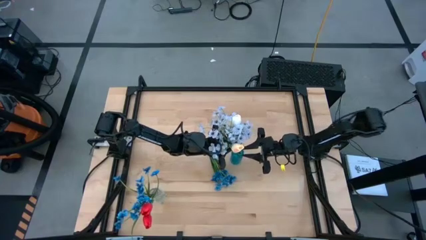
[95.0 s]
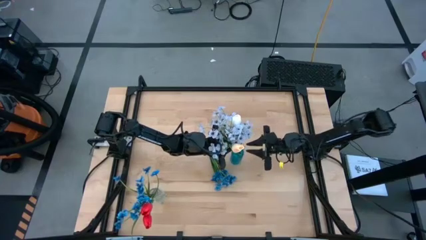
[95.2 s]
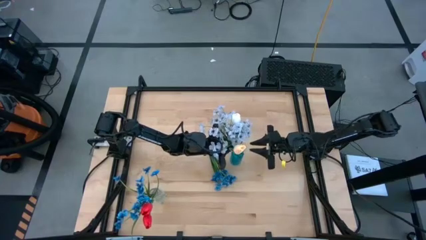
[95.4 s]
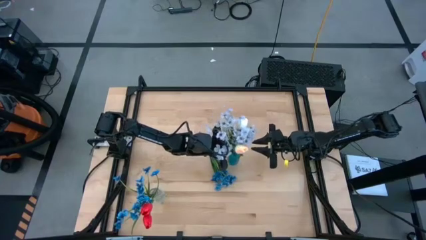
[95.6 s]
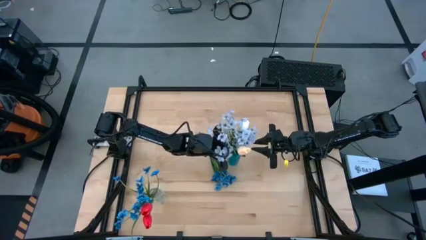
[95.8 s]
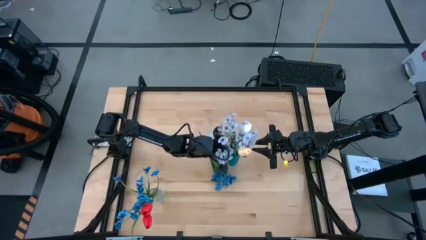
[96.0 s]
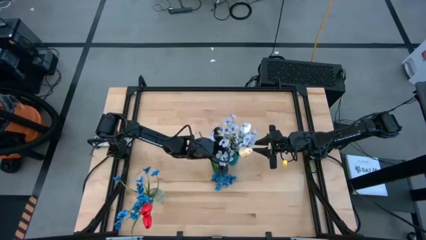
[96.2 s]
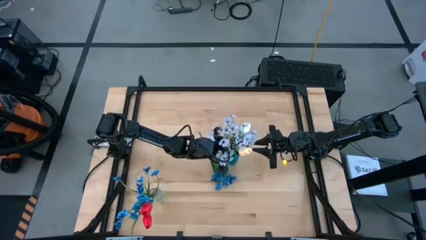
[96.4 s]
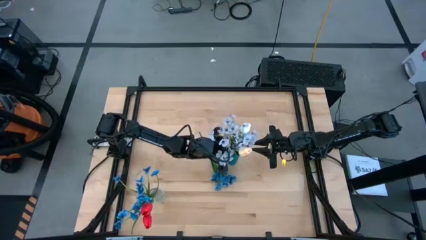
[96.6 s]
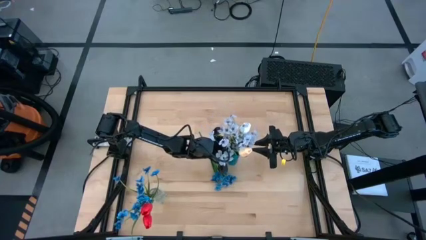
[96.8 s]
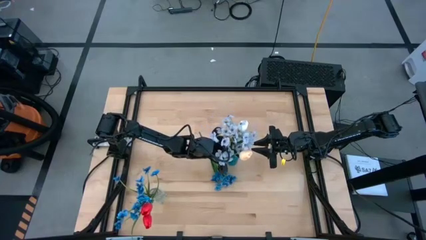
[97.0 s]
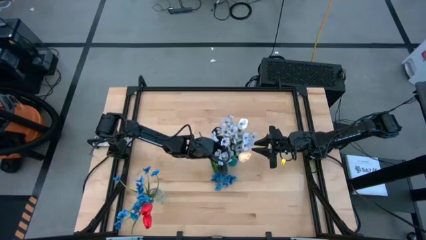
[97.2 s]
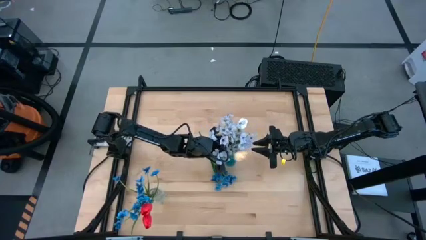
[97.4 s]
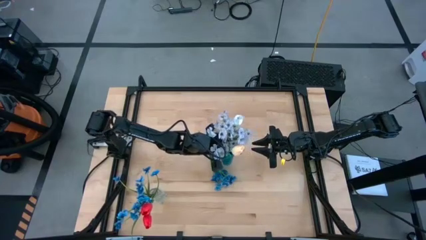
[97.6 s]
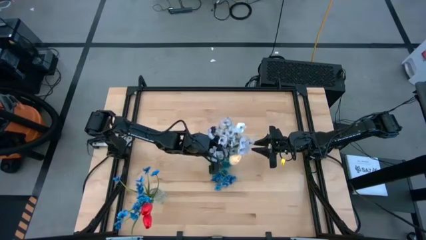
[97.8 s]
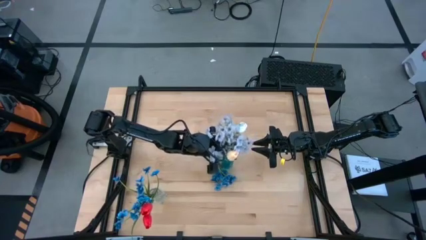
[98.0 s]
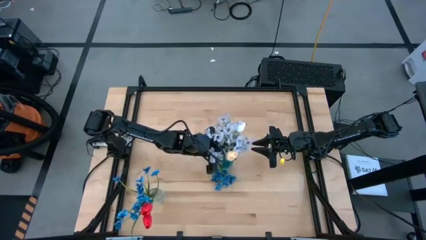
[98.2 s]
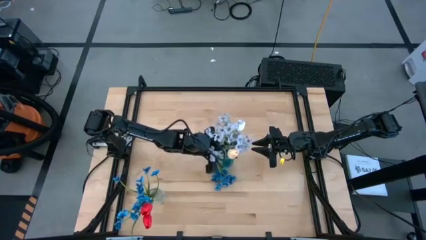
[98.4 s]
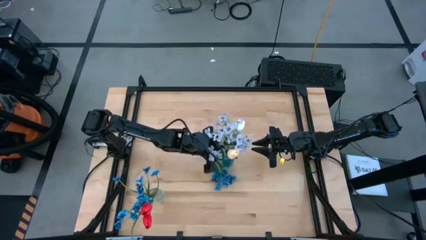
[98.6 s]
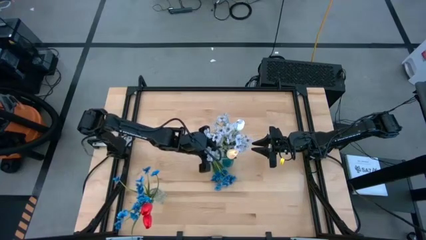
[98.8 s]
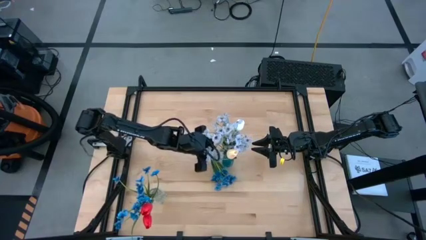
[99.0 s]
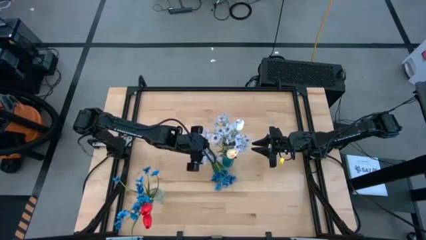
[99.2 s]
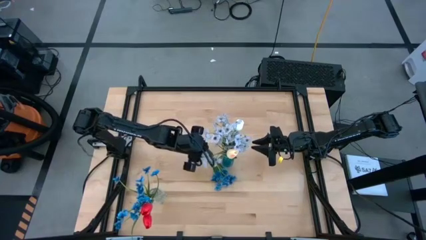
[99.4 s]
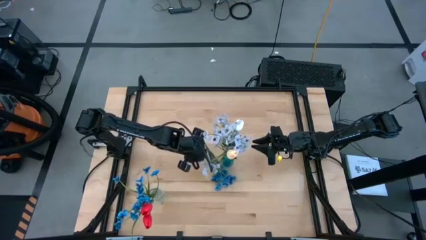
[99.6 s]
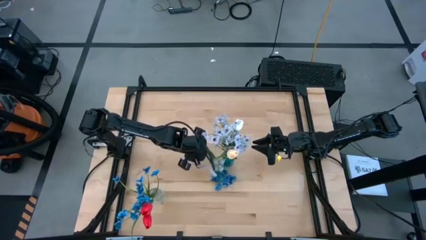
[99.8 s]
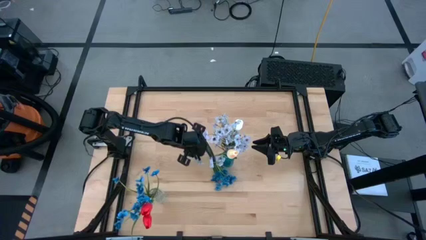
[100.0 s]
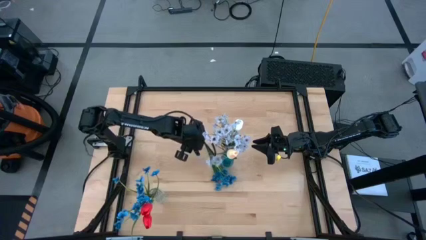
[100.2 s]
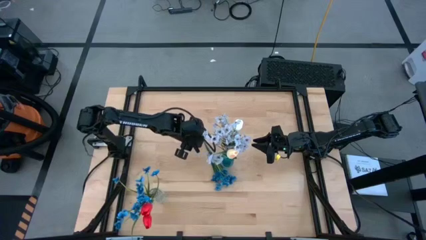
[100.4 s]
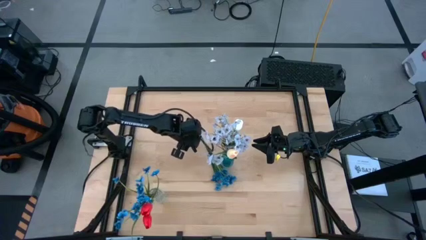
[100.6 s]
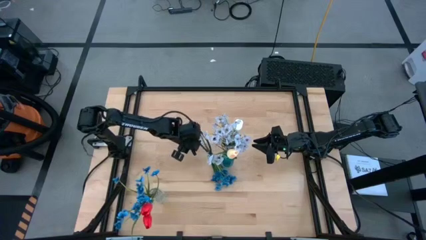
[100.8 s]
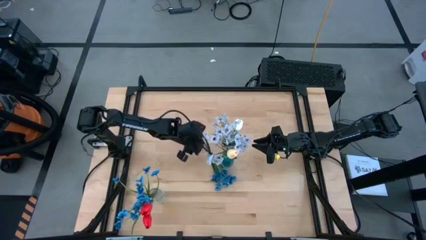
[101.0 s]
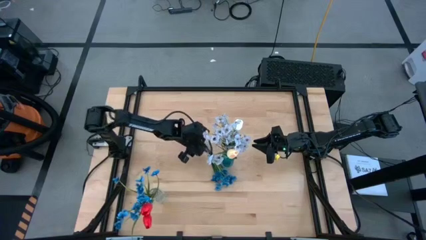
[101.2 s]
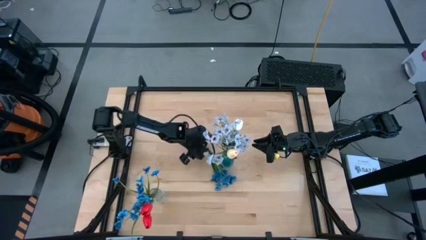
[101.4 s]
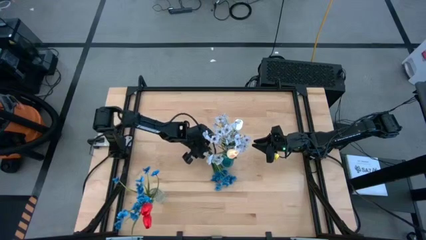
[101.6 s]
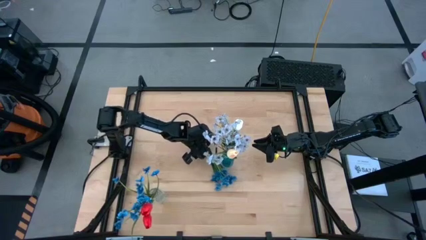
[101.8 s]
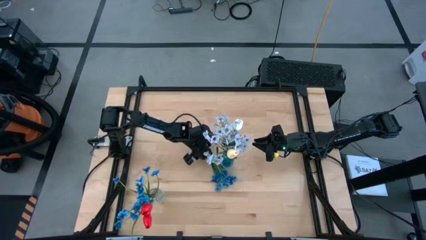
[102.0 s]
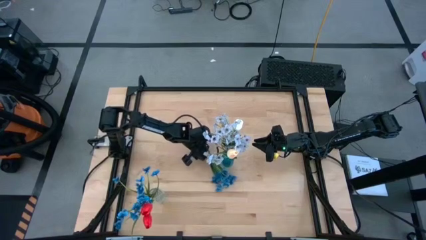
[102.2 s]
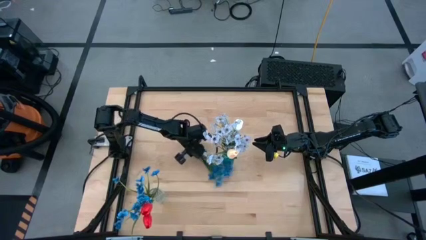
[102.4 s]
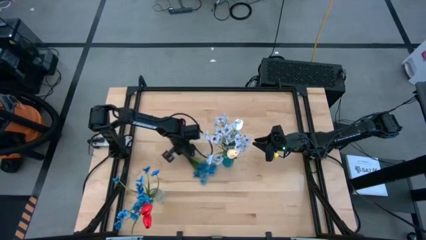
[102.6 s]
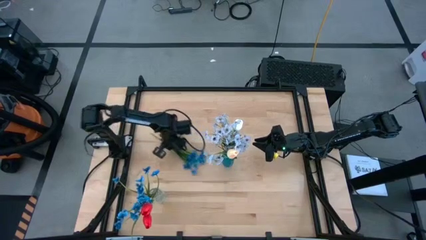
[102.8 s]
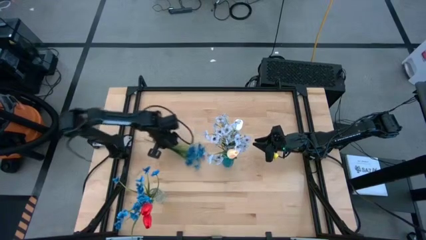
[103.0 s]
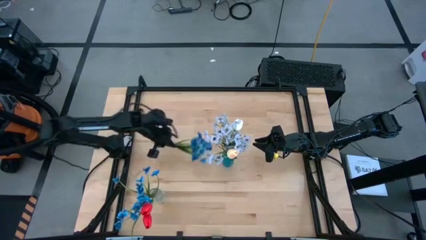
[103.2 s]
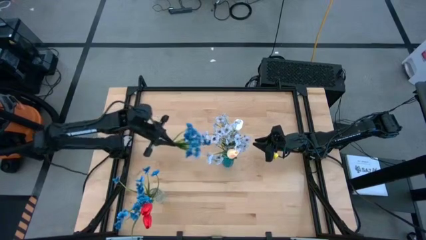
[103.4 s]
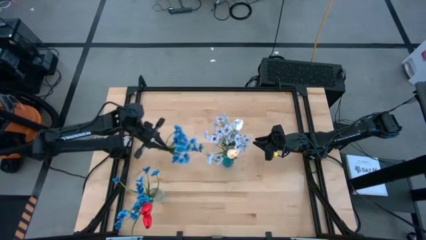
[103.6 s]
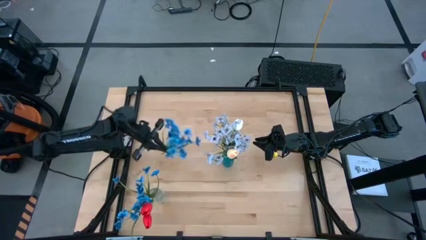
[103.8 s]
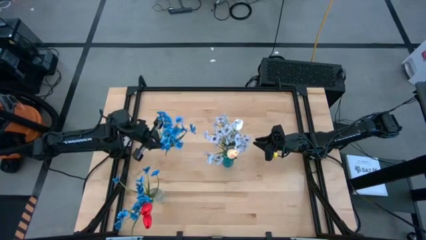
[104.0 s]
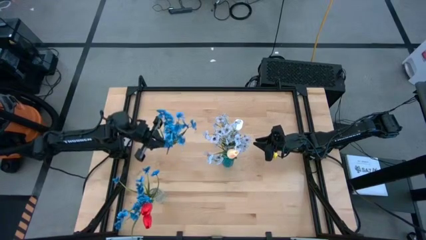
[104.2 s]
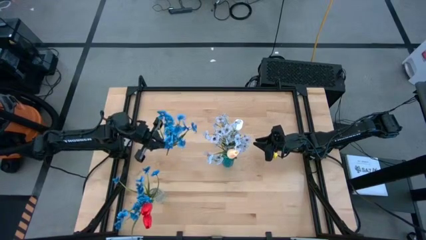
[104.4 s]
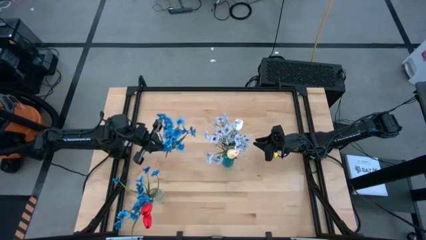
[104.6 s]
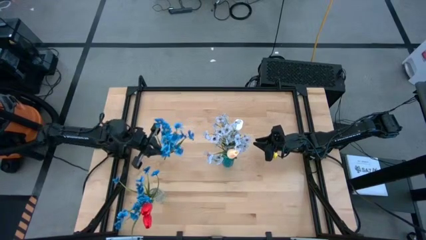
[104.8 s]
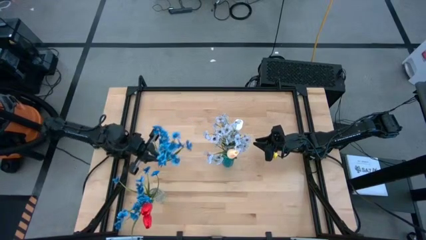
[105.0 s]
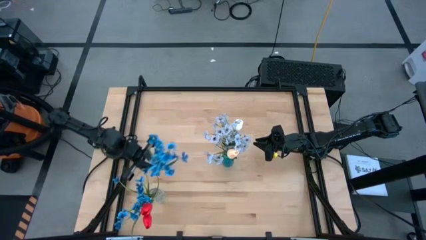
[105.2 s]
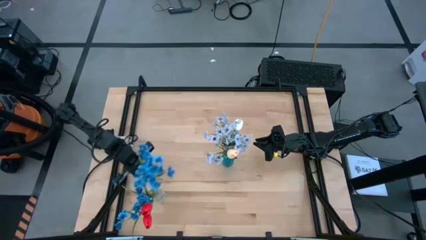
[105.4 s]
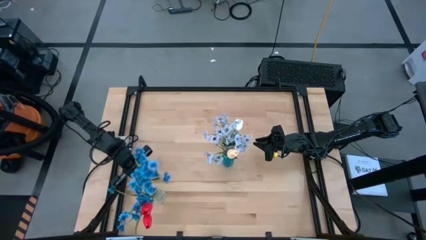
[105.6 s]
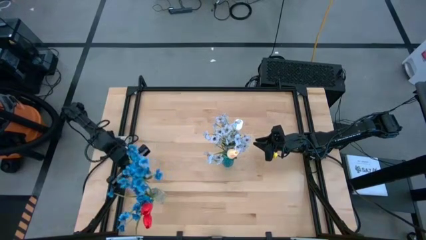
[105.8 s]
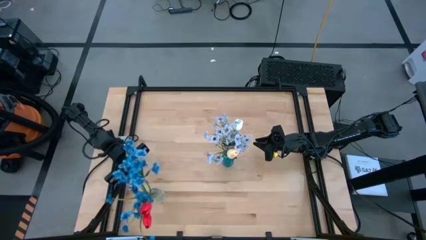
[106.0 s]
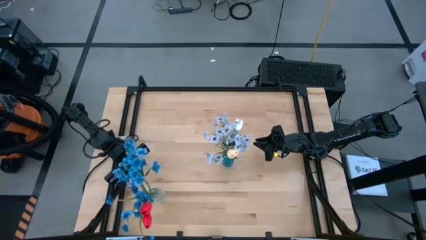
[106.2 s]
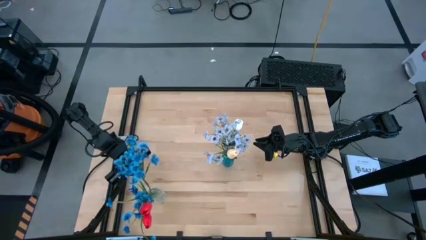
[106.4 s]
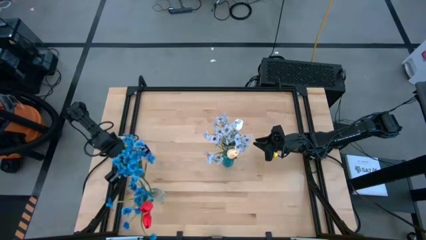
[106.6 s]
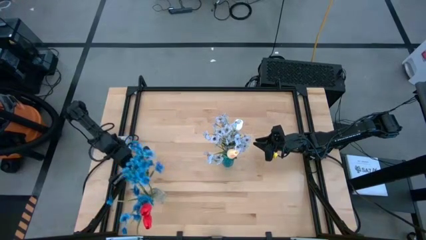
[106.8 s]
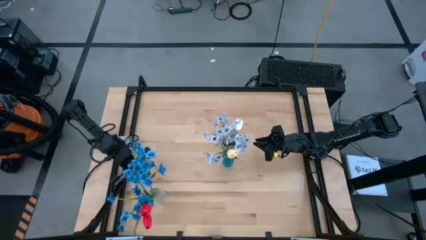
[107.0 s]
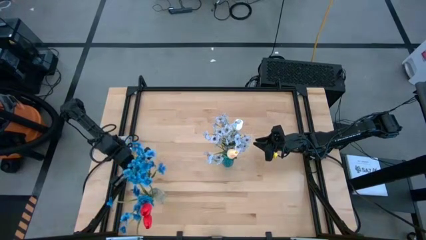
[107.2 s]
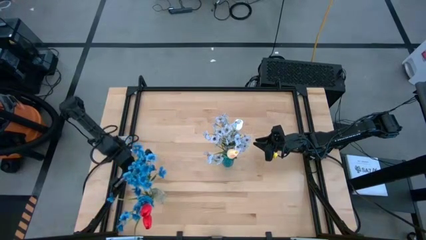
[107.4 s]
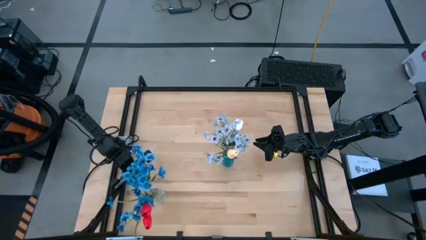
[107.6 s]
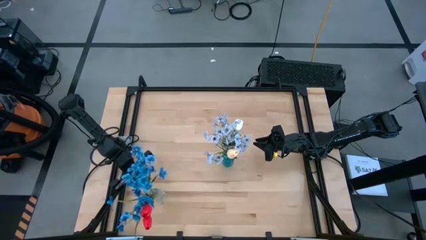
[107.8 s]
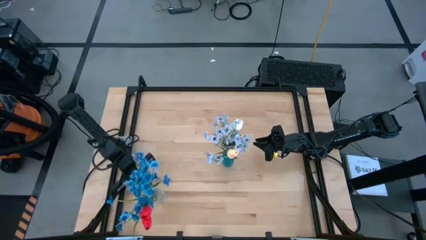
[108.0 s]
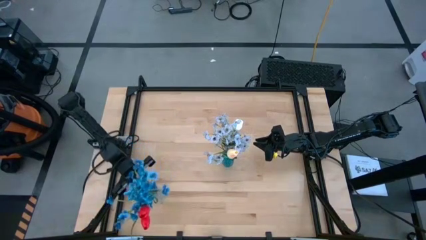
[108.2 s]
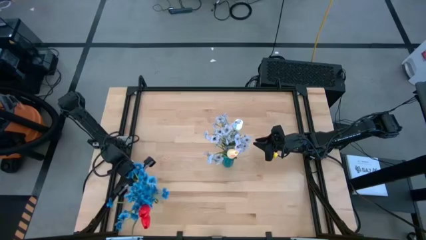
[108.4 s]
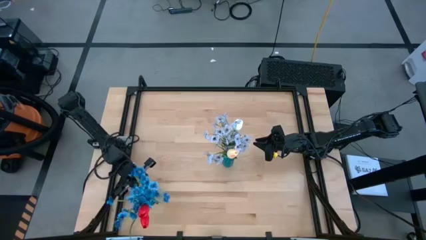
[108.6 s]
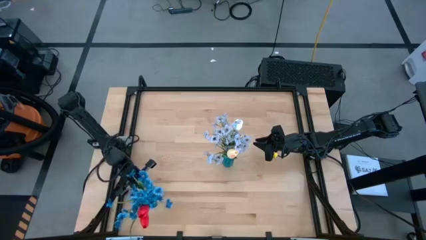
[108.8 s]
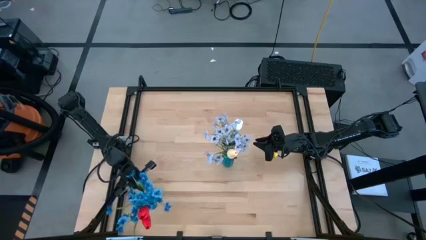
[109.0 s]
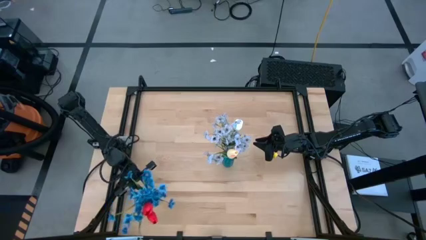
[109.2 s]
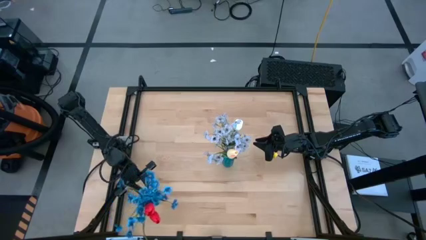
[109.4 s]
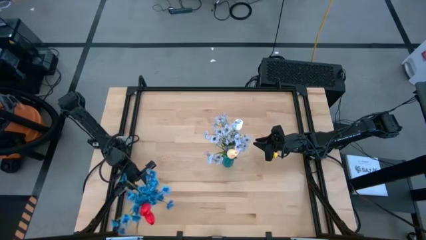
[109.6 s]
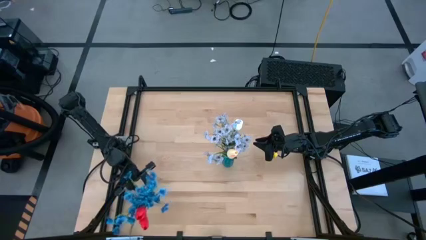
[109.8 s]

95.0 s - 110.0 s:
Task: Sort flowers into vase by color
Put the blue flowers into the transparent flower vase

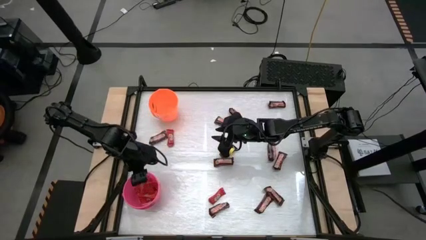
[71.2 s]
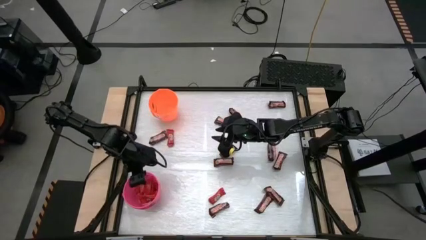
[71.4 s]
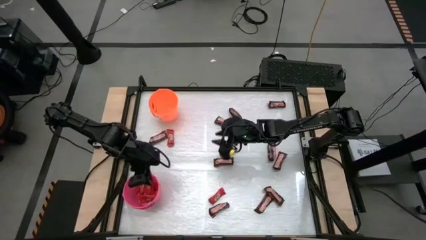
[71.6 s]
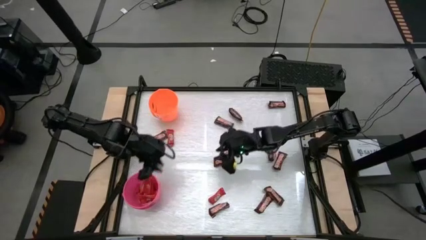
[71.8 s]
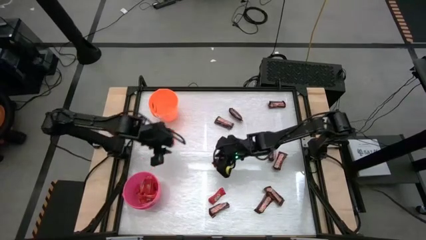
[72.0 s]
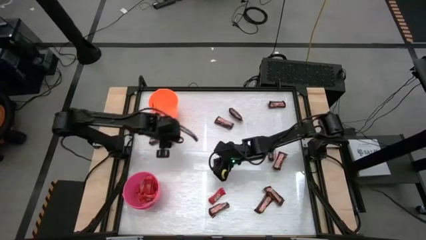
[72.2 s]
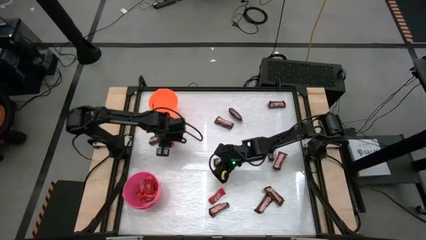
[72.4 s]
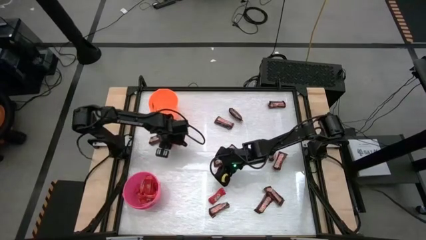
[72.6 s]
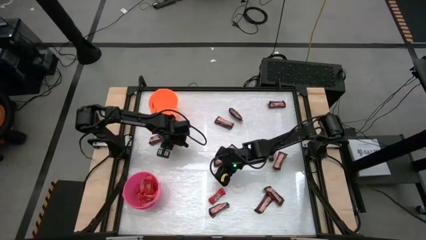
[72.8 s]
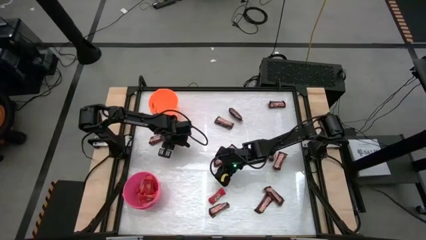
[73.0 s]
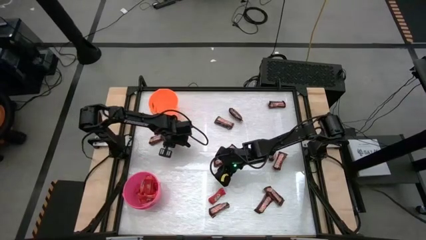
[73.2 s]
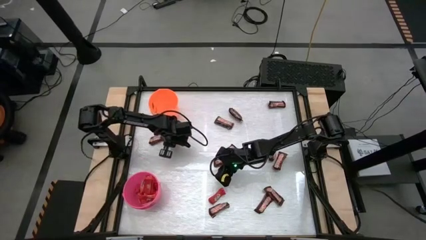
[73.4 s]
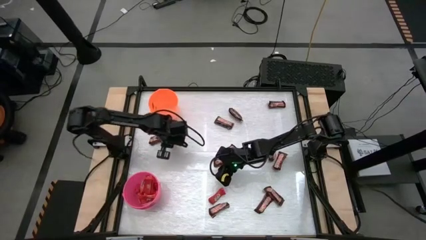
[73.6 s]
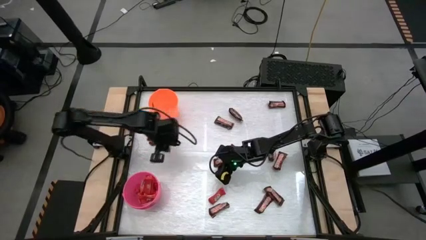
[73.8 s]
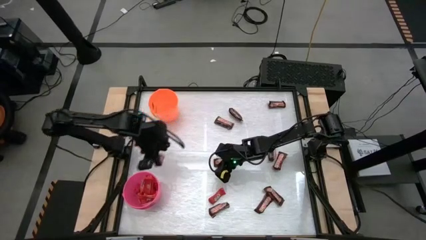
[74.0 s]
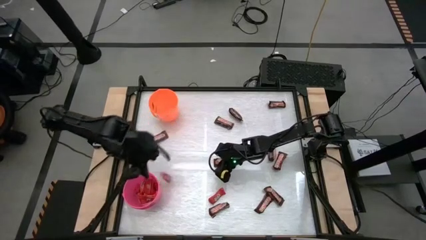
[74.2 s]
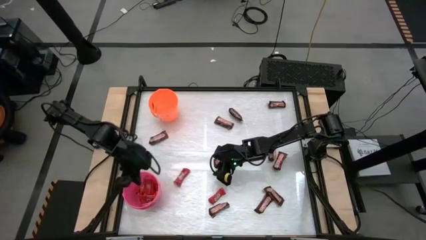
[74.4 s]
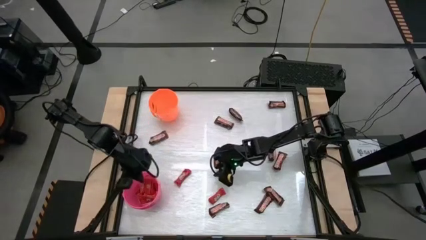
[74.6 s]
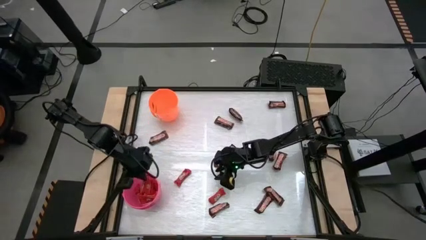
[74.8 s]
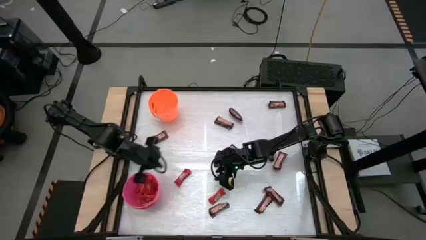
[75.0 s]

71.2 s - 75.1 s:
Task: Sort candy by brand, put in halloween buckets
Put the red chocolate bar into the pink bucket
